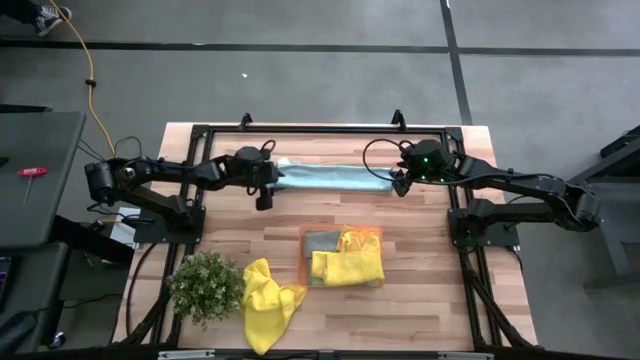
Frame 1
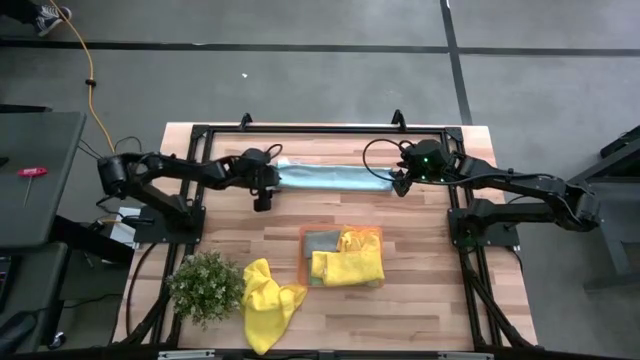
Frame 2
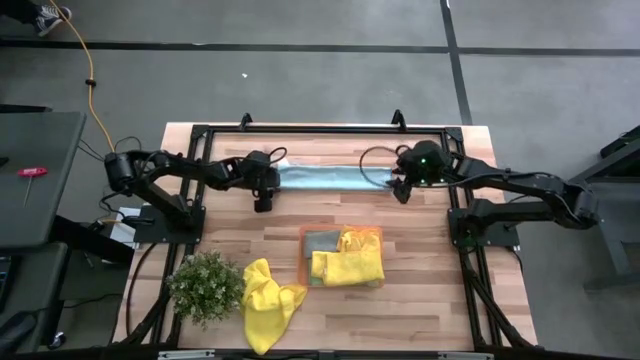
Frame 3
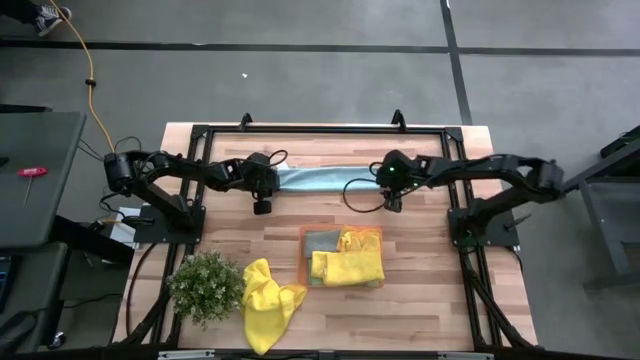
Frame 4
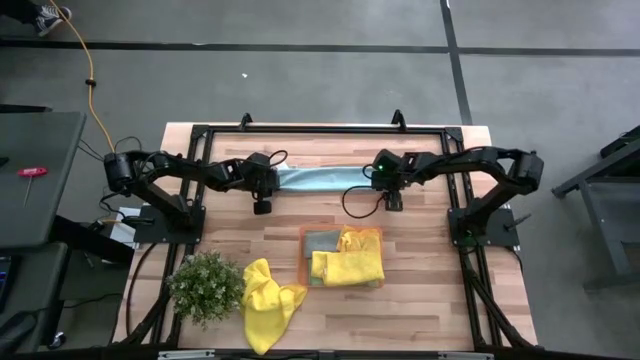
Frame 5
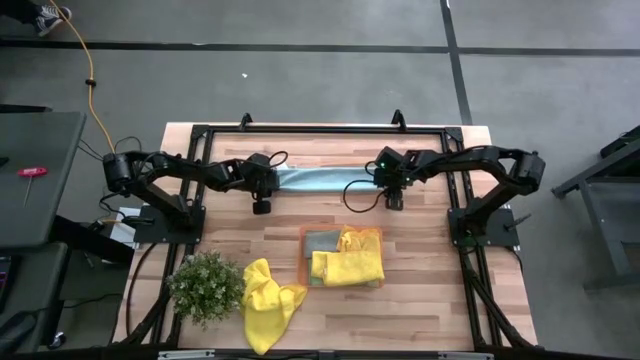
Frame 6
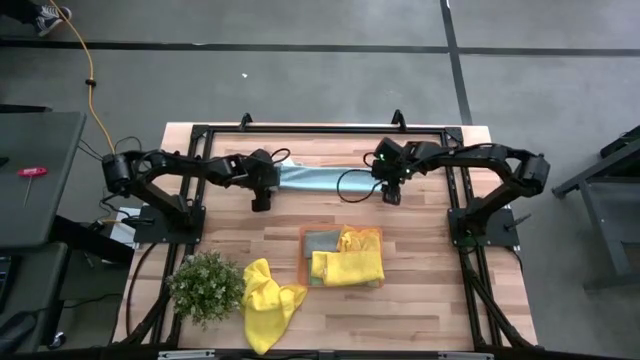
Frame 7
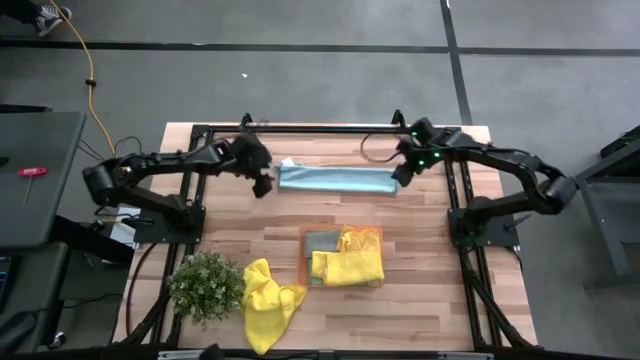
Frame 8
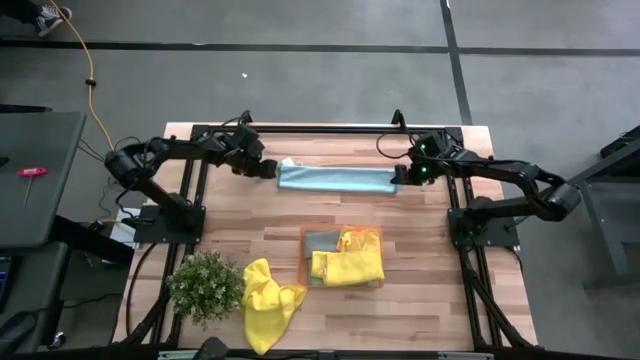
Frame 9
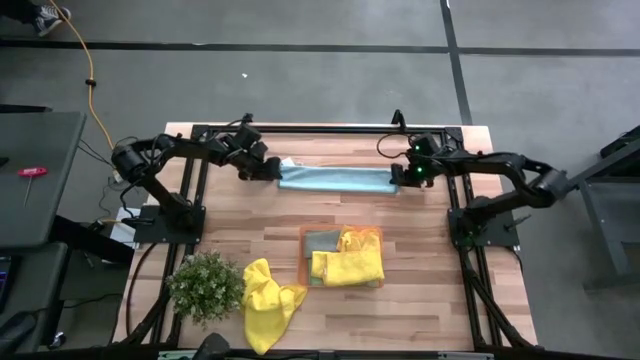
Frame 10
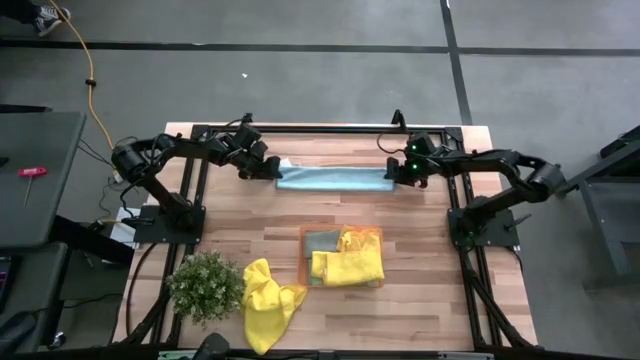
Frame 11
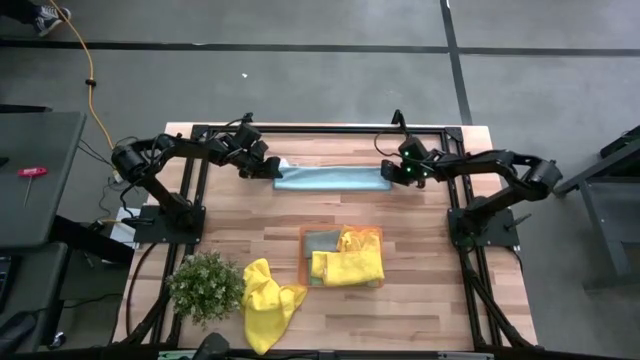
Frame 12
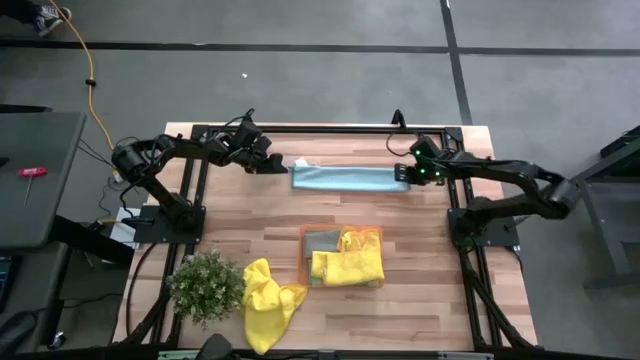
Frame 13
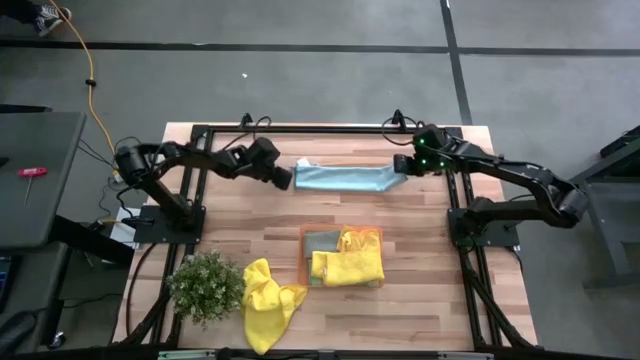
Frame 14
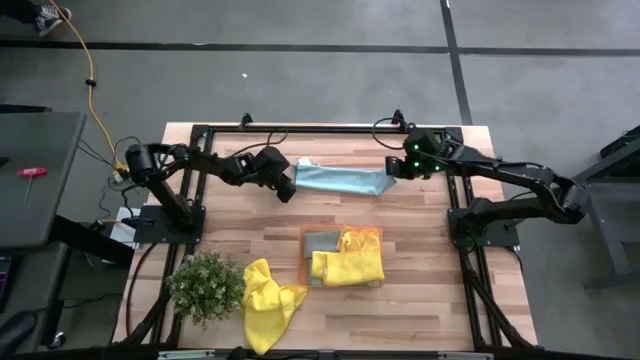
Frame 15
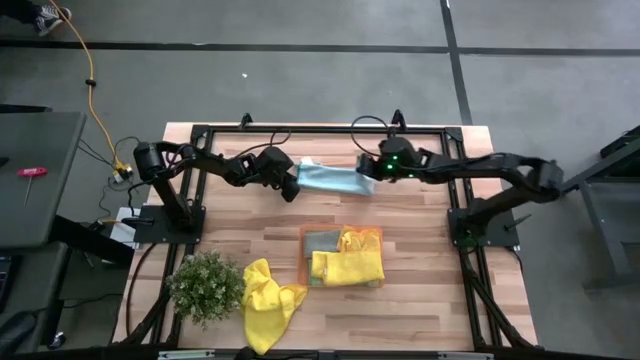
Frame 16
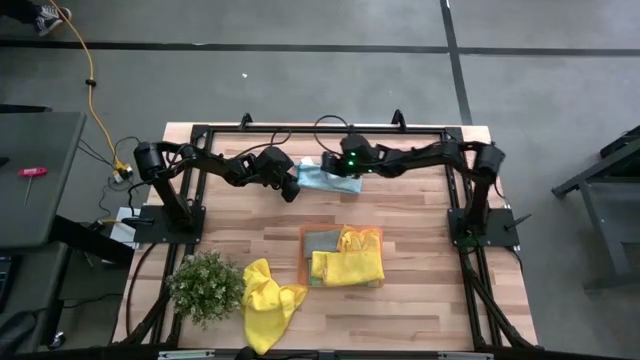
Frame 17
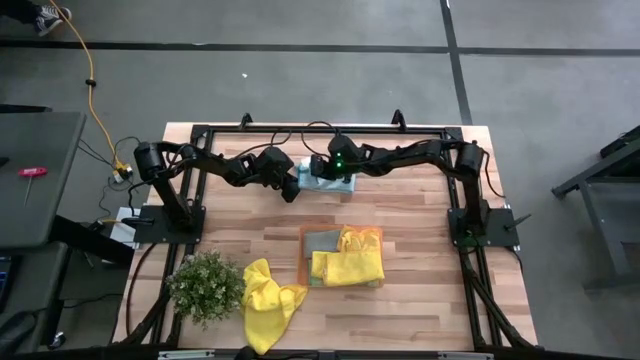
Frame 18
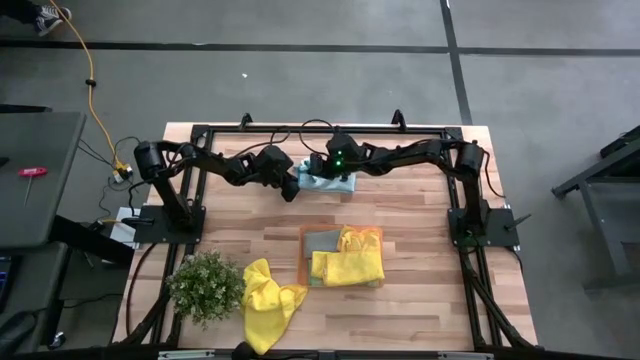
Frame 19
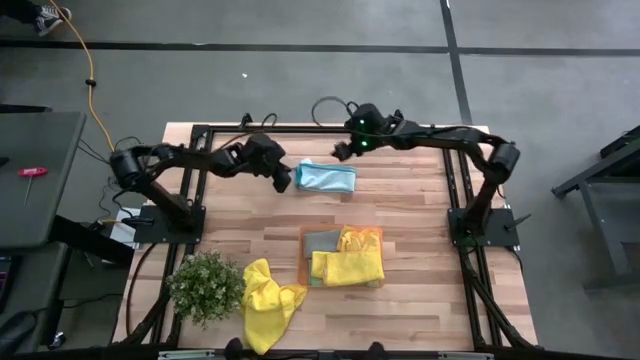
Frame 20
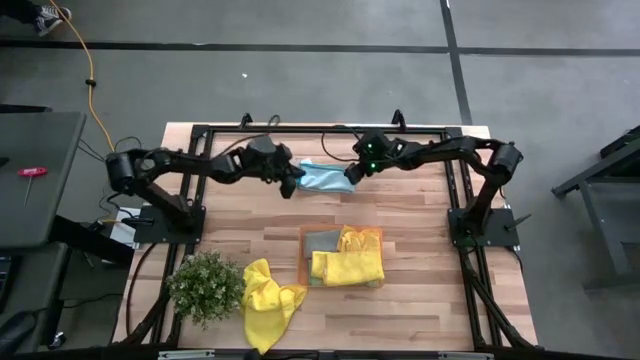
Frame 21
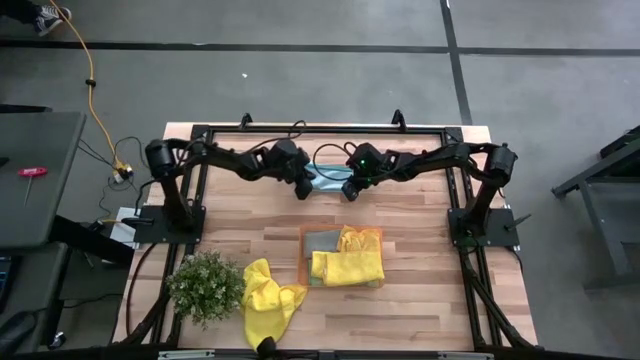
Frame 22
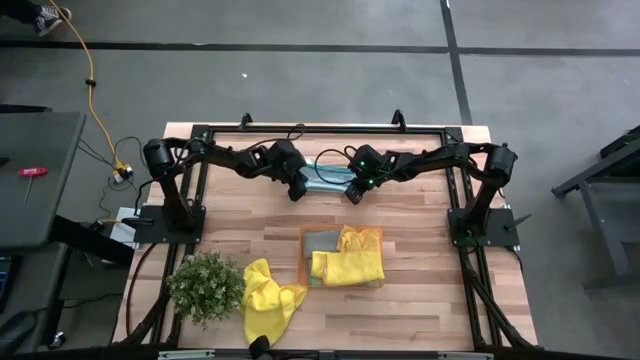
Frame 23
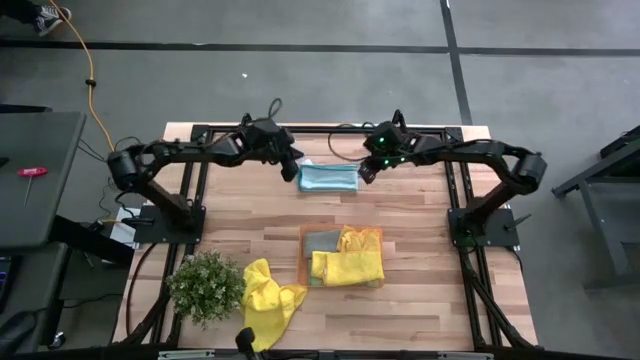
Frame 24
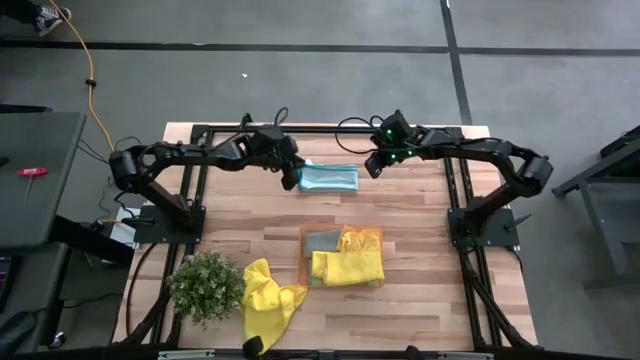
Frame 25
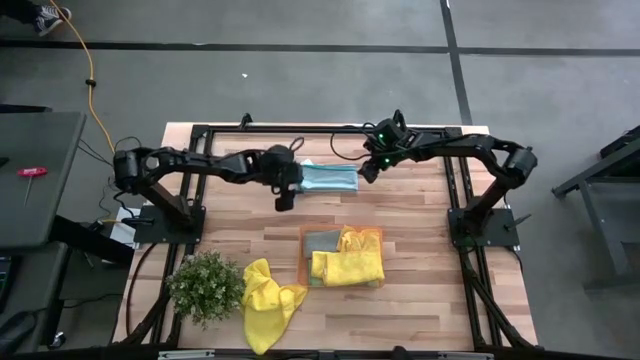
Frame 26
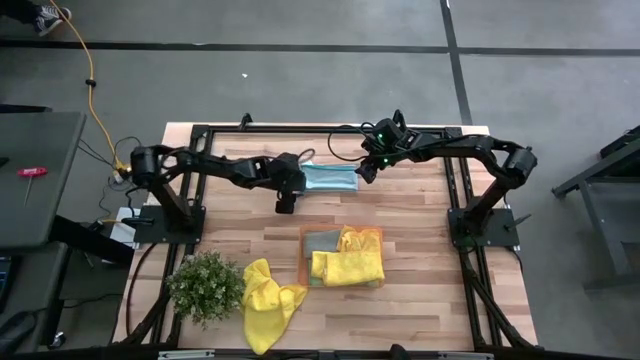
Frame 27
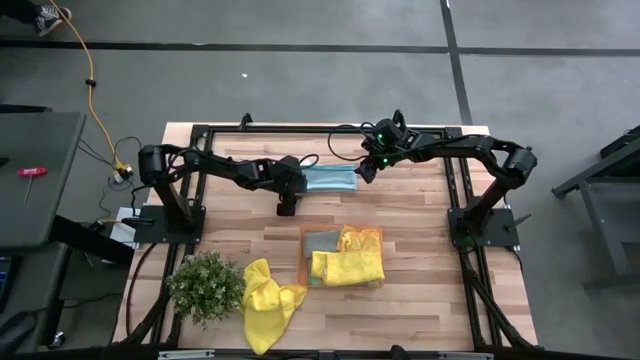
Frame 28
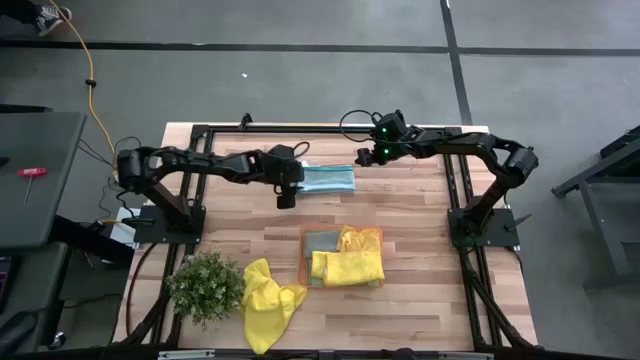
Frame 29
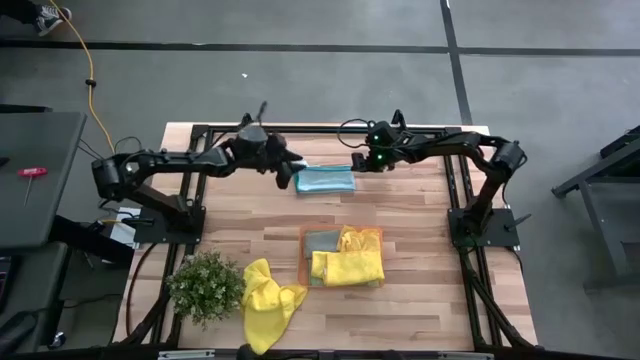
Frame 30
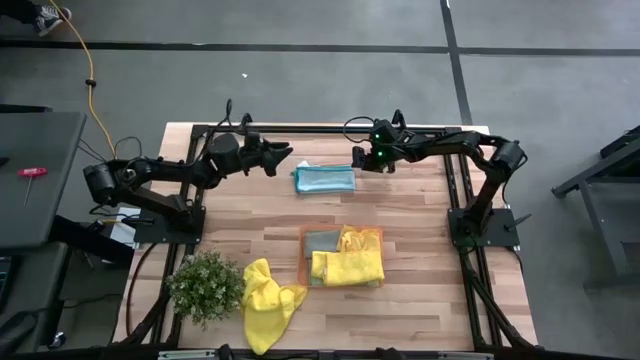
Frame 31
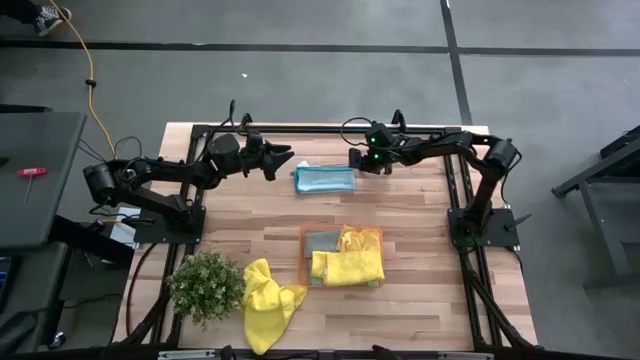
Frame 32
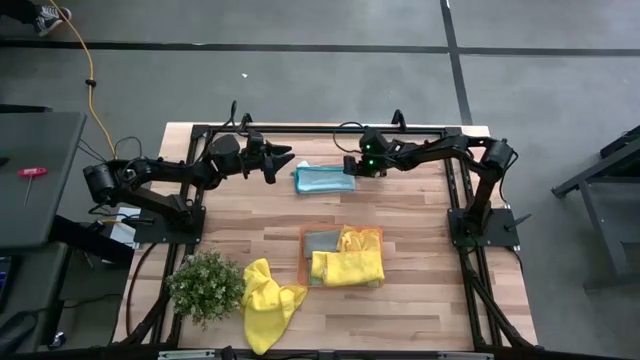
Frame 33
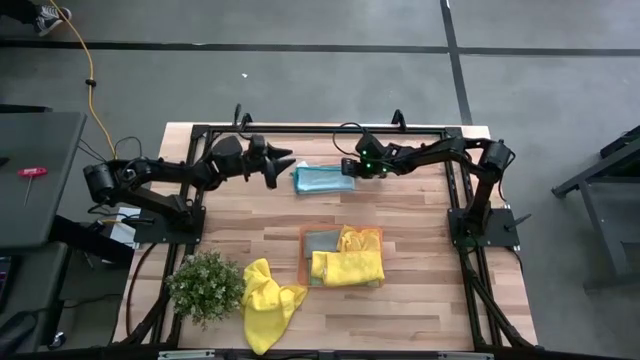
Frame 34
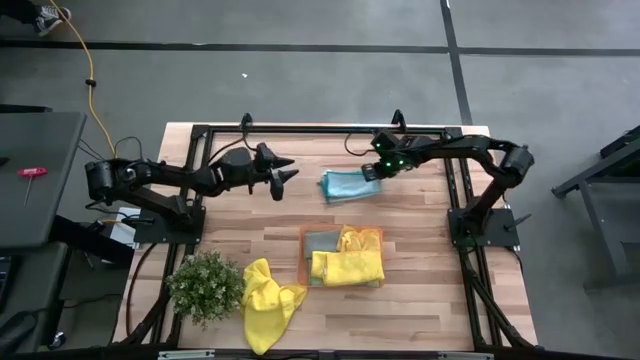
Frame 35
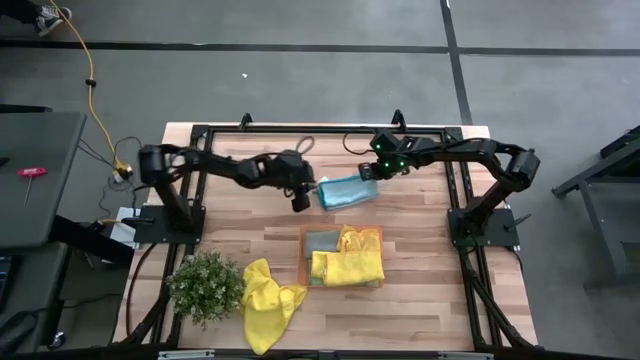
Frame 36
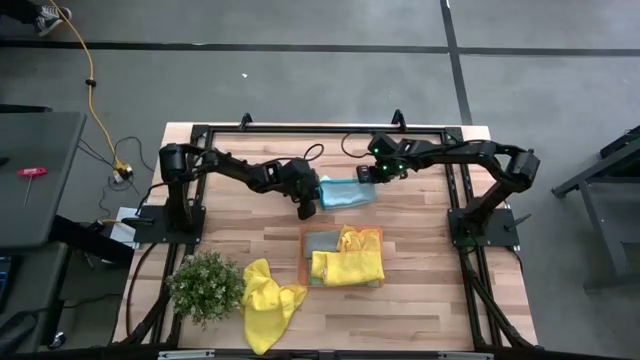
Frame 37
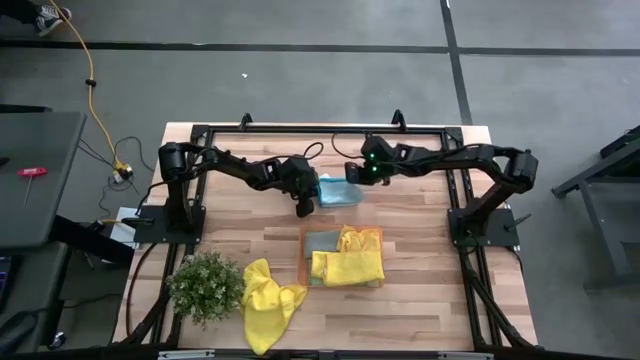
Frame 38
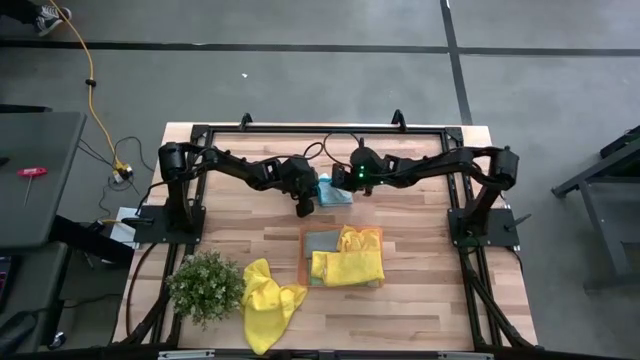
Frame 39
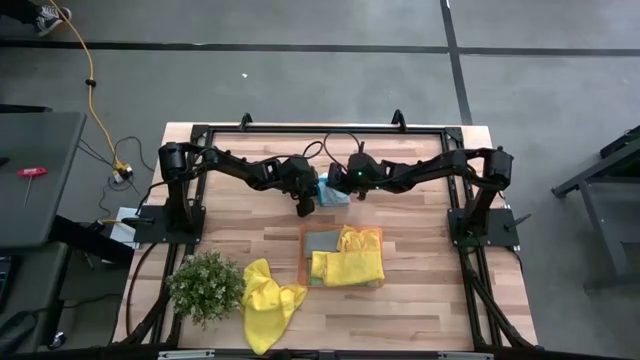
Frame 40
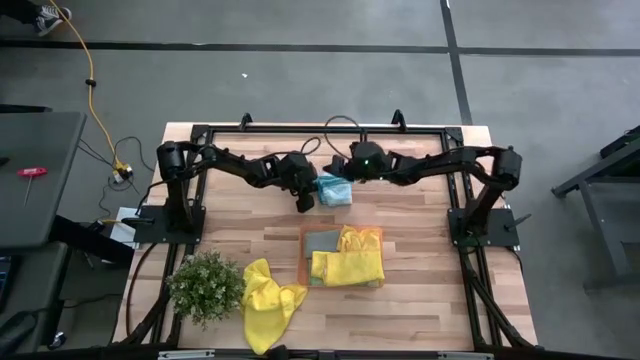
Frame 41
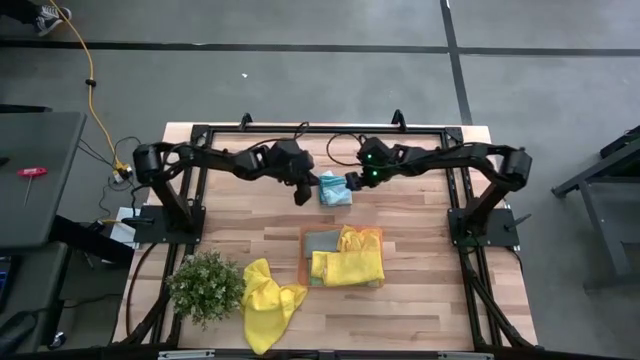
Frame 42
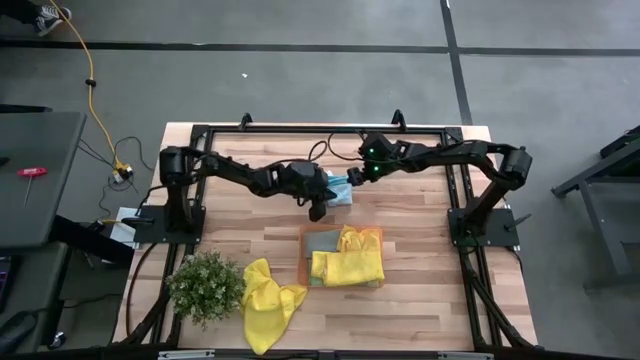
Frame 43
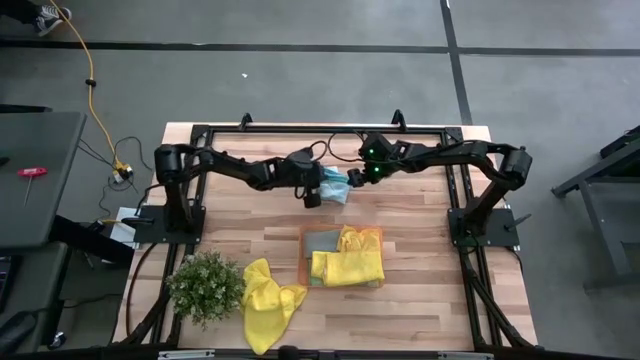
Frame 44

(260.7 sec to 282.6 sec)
Task: Fold microfiber towels
Fold the blue microfiber towel
